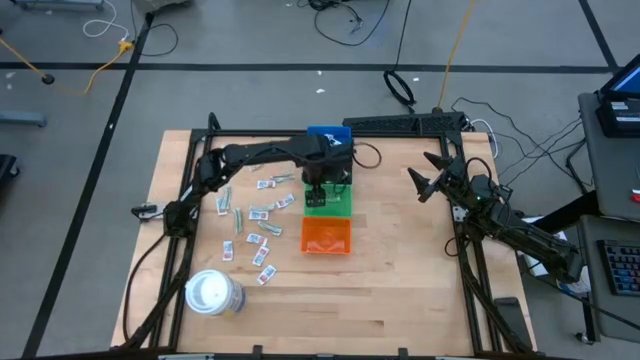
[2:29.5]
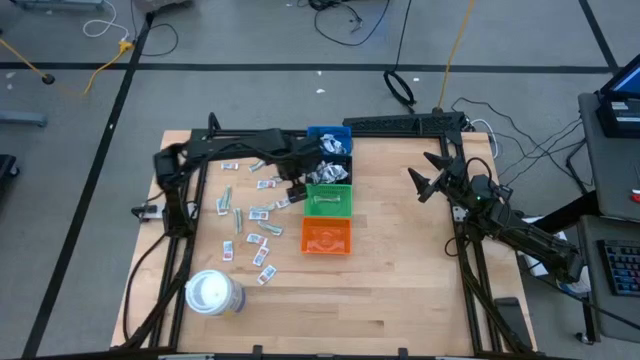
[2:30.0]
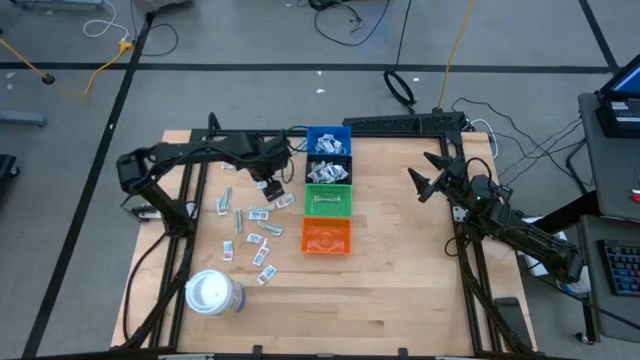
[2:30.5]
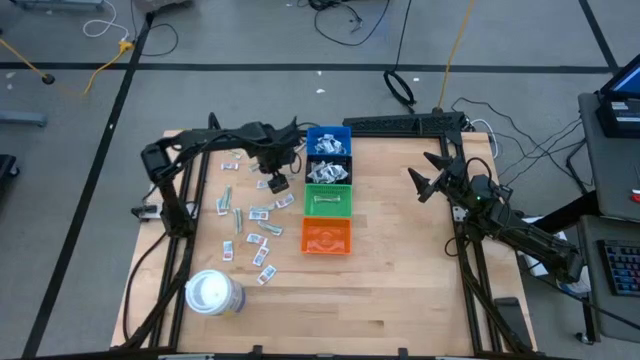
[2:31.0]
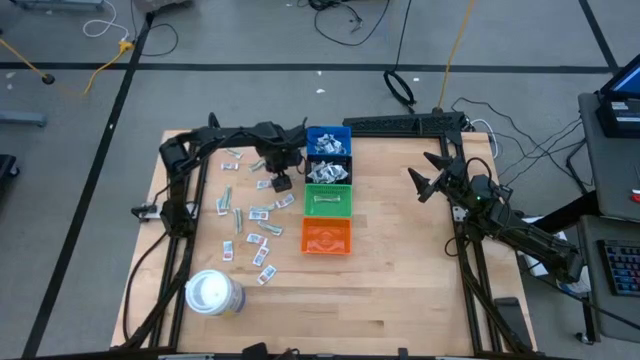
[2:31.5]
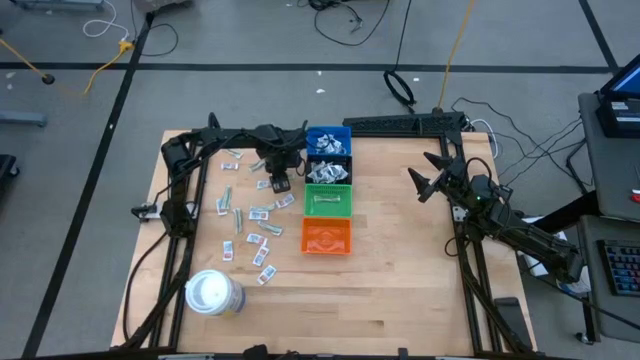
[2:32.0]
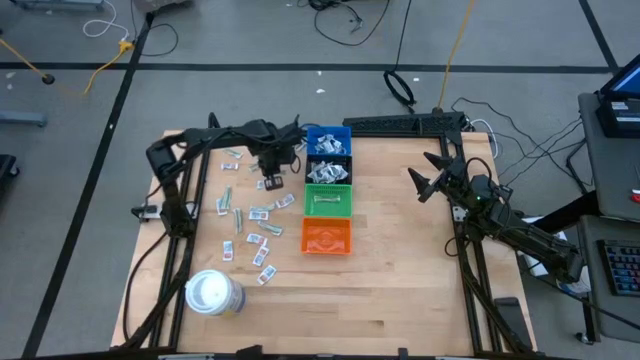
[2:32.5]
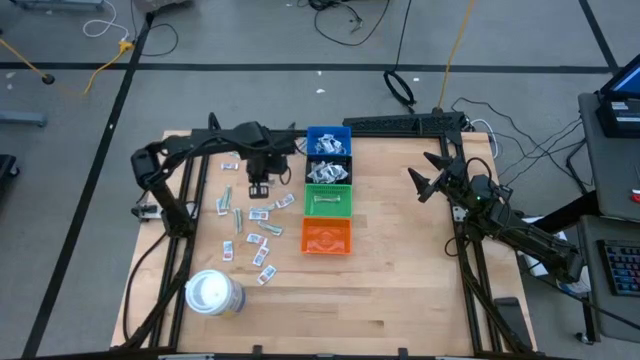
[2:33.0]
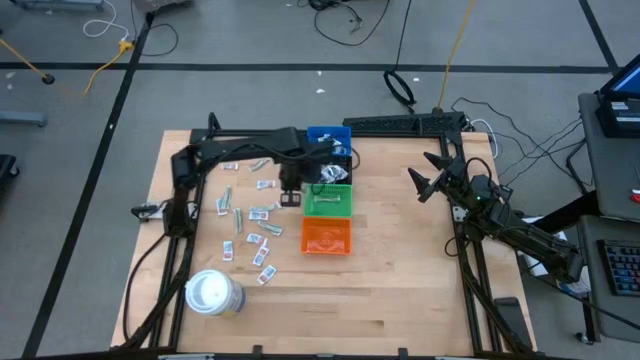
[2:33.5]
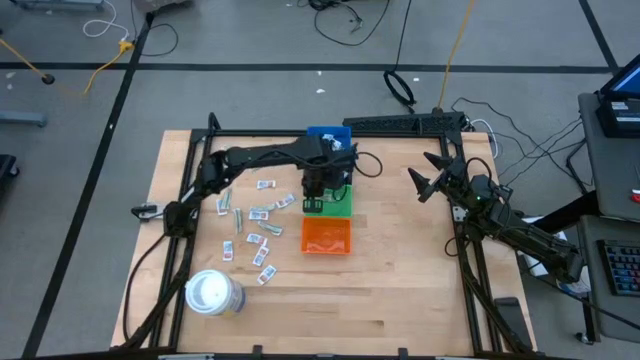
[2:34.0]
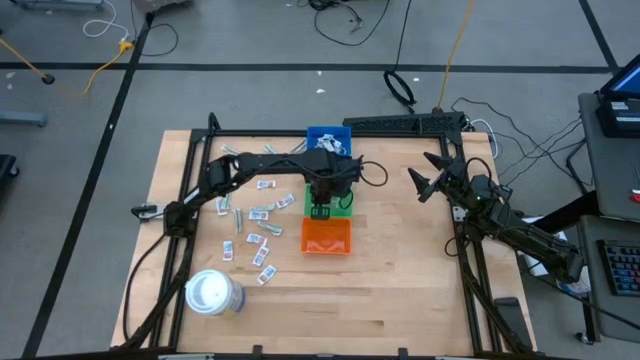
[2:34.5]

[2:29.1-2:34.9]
Task: Pick & Place First Aid Supplies
Put the green bandage into the green bin

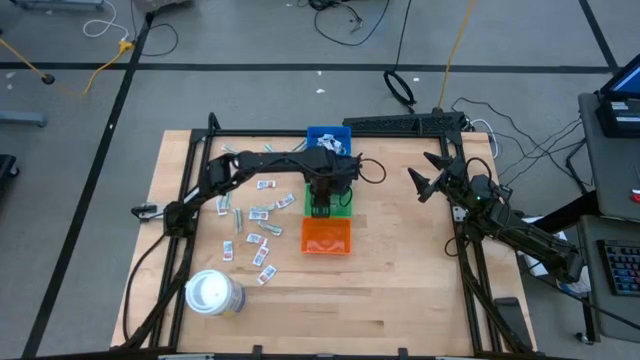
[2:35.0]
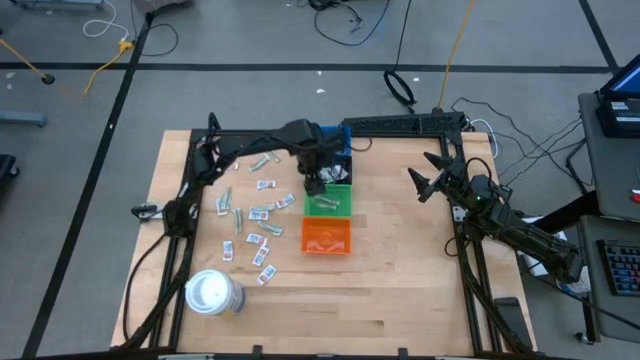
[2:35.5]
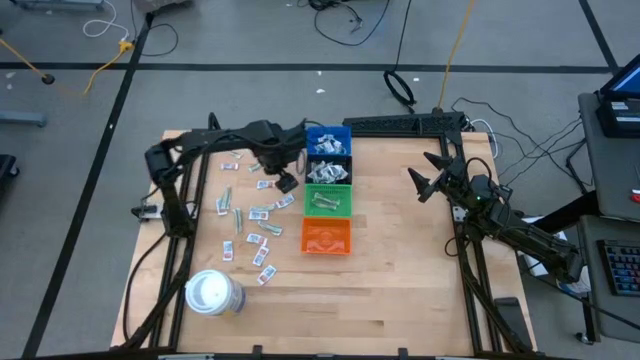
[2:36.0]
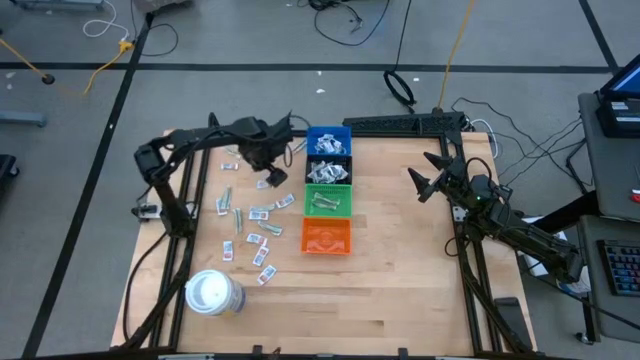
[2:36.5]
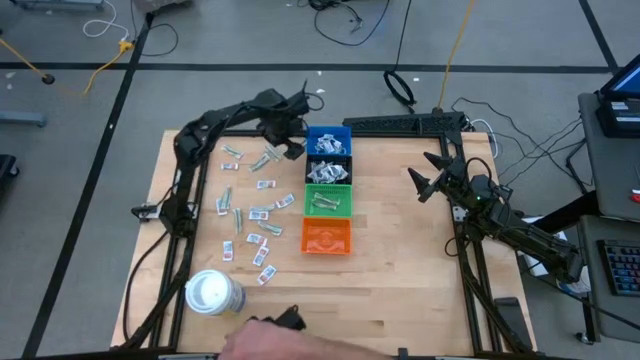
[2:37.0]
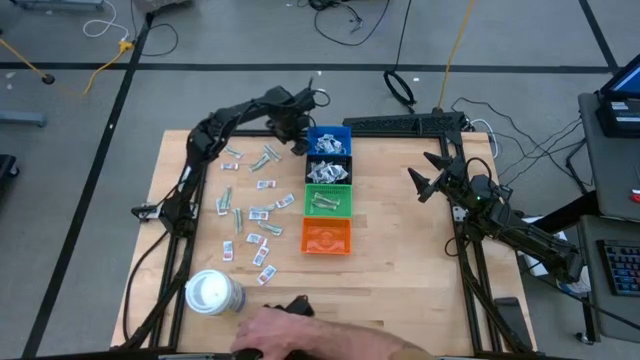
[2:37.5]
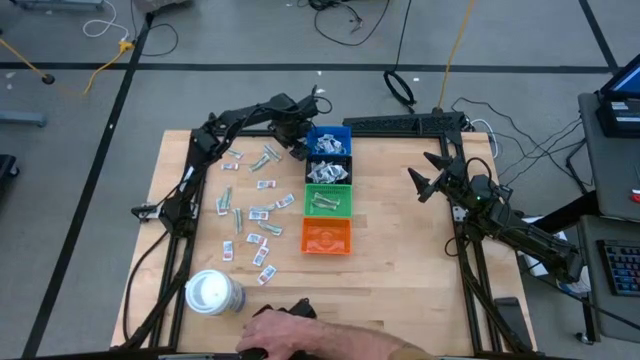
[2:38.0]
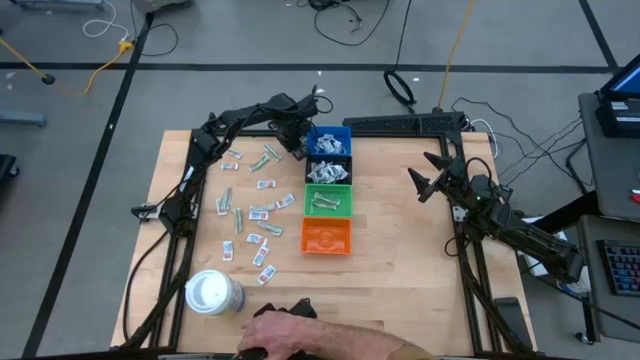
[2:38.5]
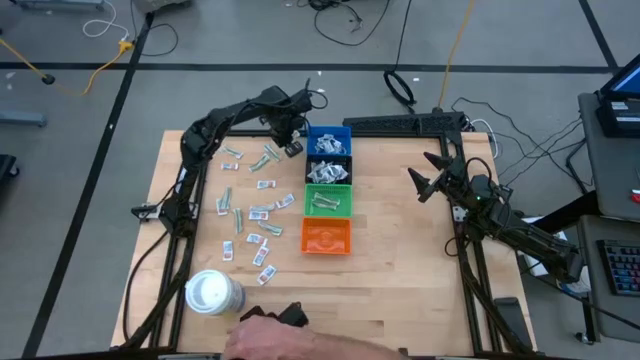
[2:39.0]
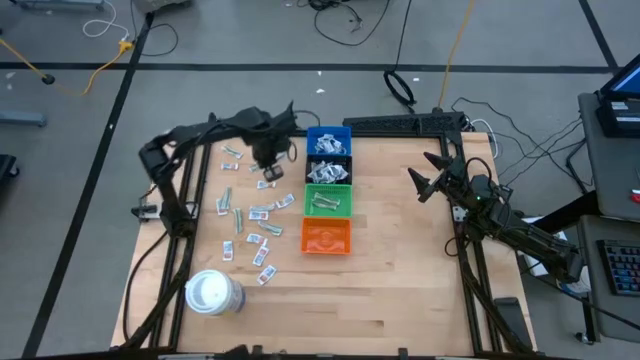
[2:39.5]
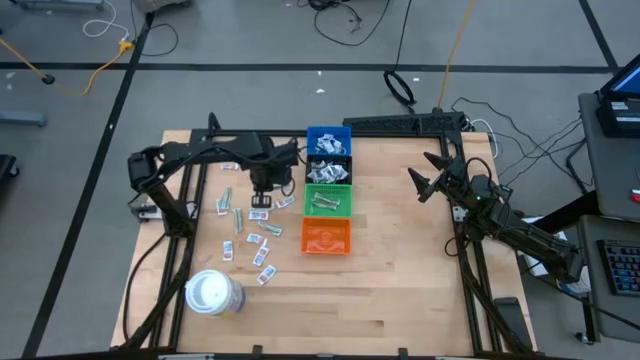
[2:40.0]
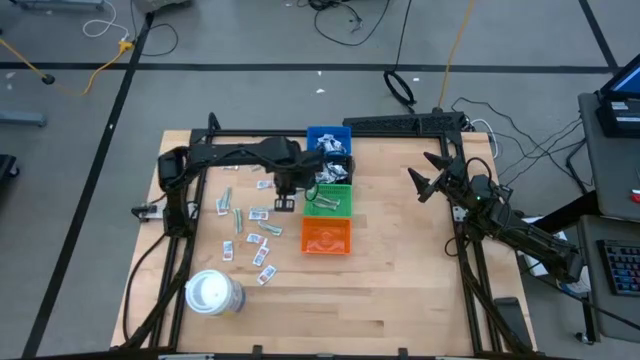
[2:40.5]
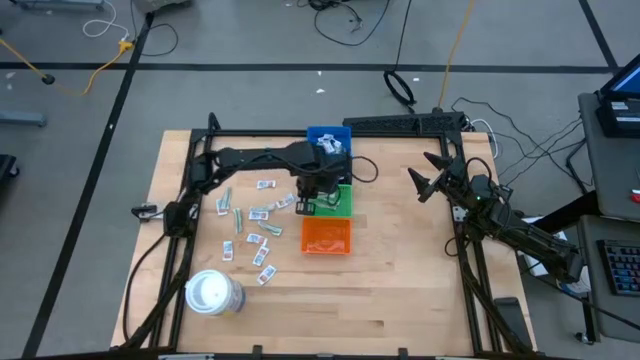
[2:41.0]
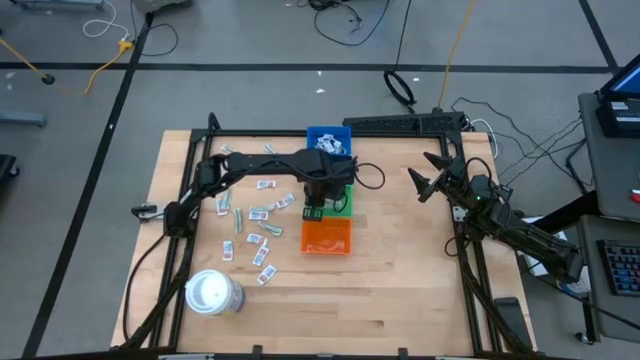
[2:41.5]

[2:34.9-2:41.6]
Put the green bandage into the green bin

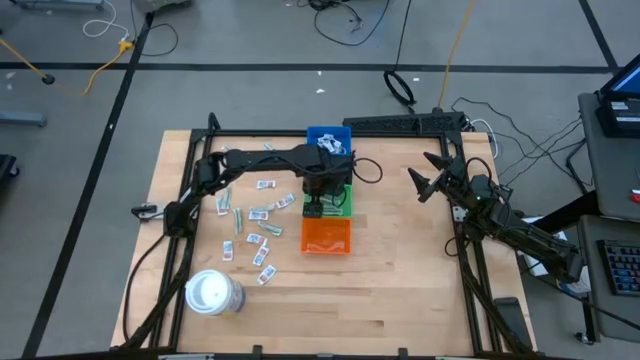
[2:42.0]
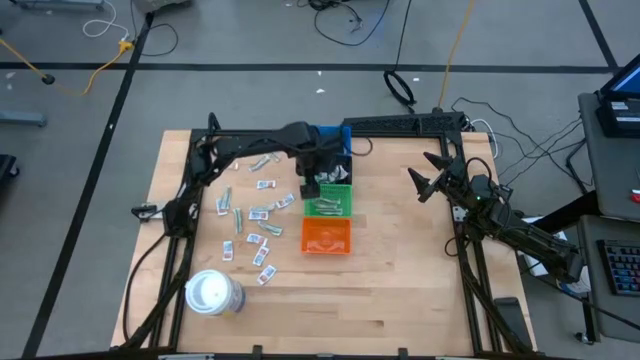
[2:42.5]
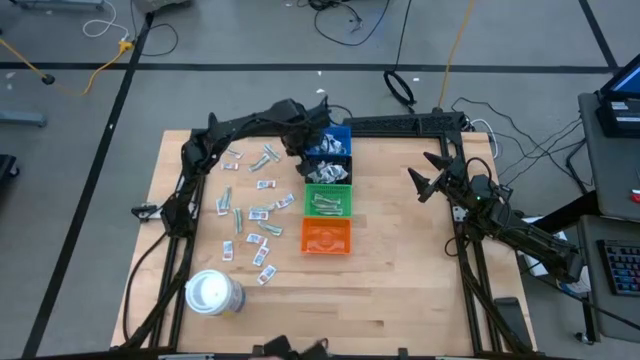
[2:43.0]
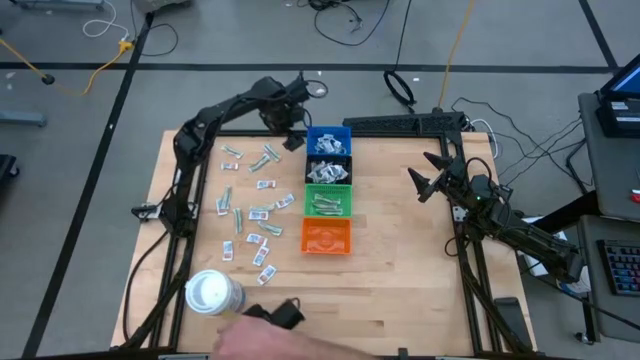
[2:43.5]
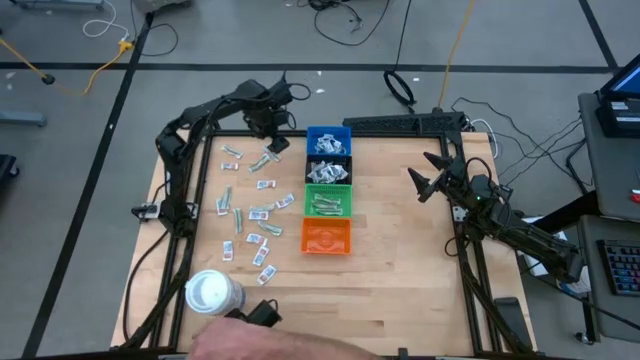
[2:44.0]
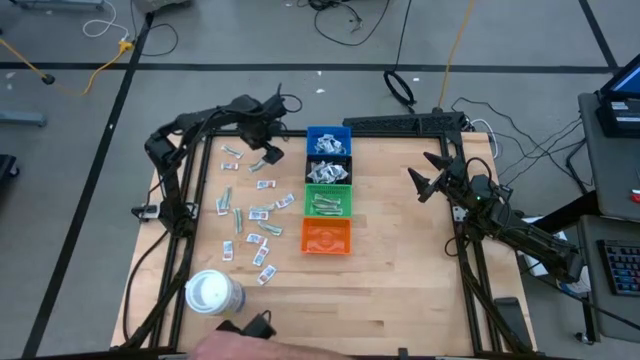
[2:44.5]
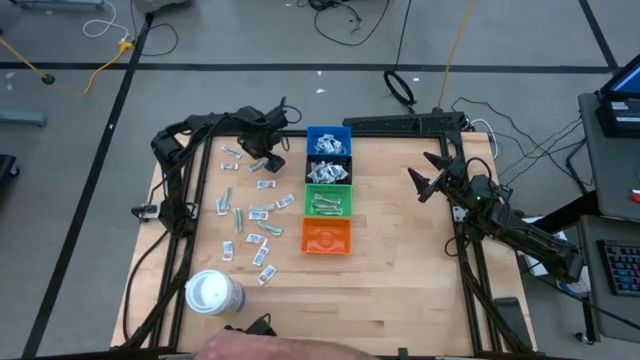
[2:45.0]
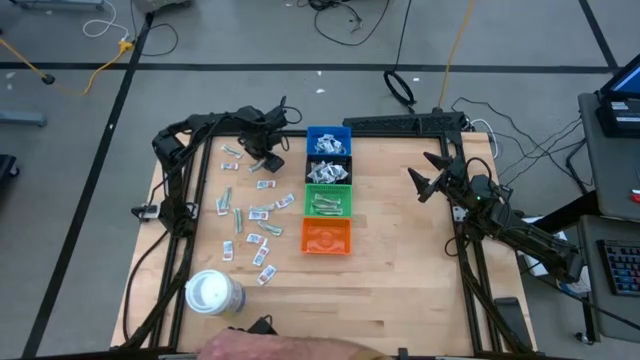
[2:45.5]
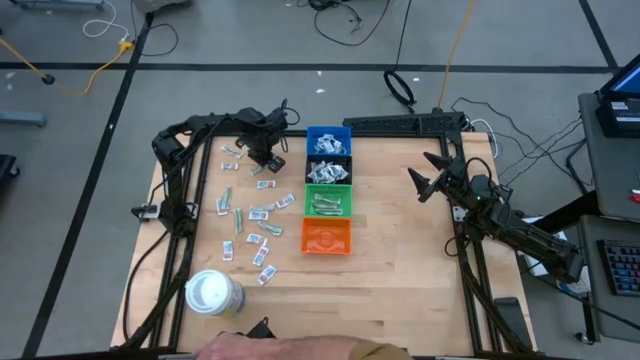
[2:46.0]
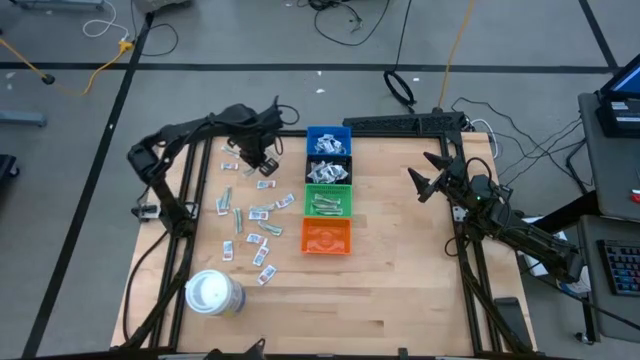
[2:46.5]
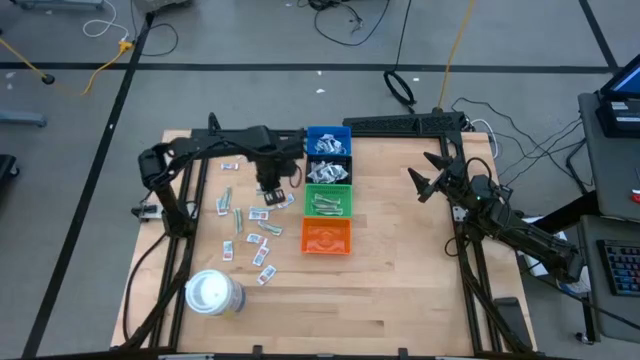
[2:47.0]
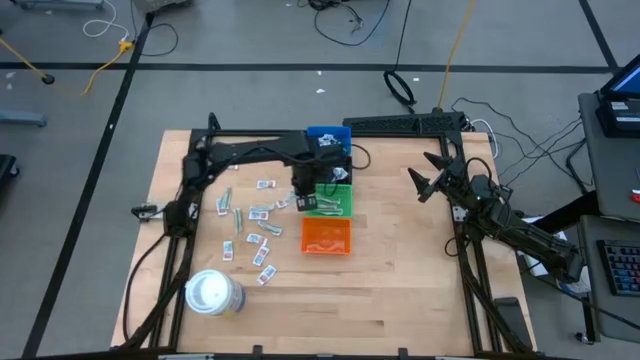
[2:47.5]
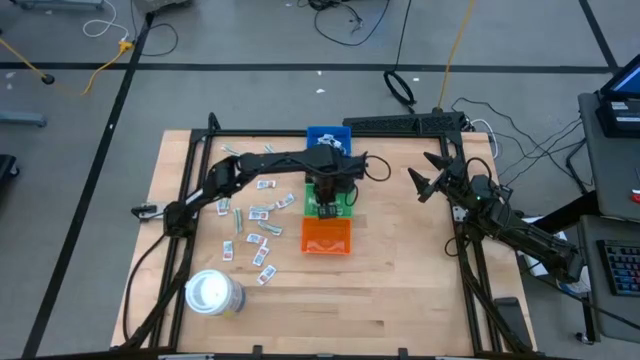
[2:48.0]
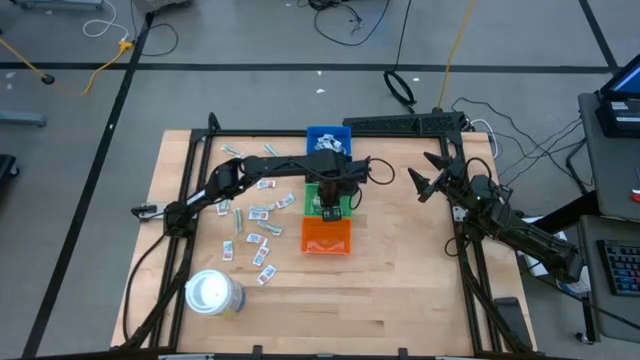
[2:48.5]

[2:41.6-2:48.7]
Put the green bandage into the green bin
